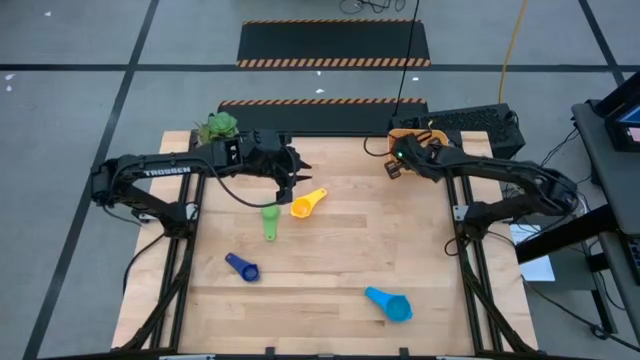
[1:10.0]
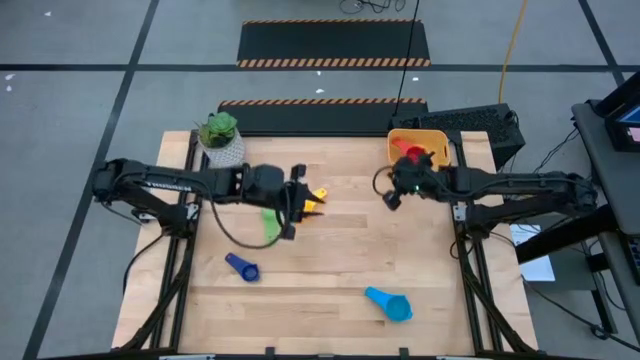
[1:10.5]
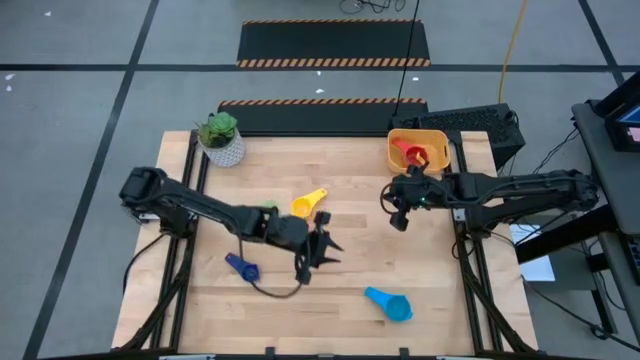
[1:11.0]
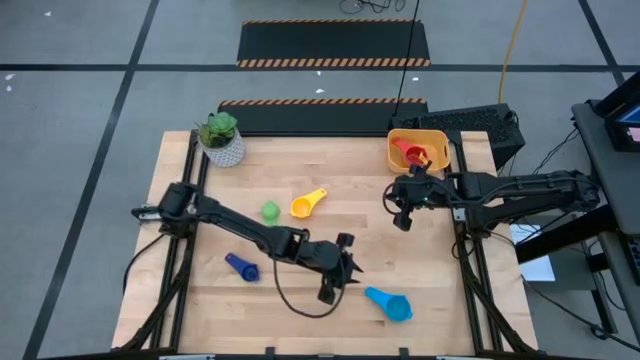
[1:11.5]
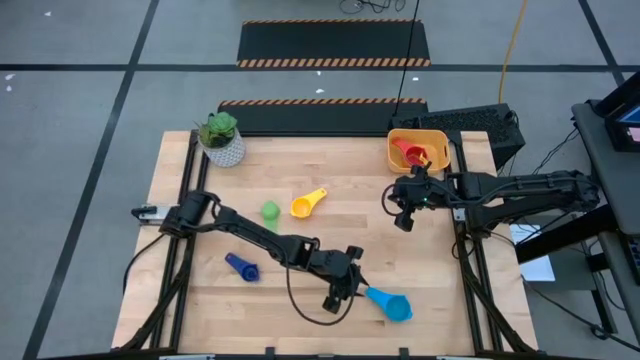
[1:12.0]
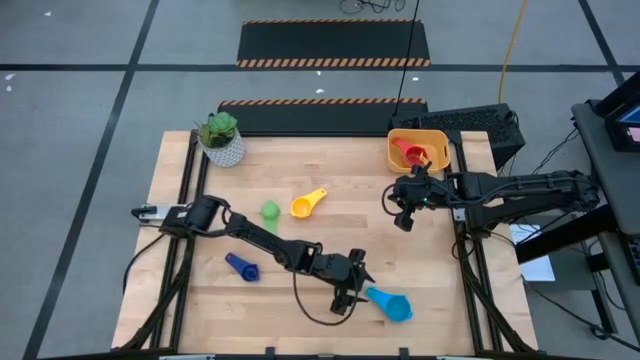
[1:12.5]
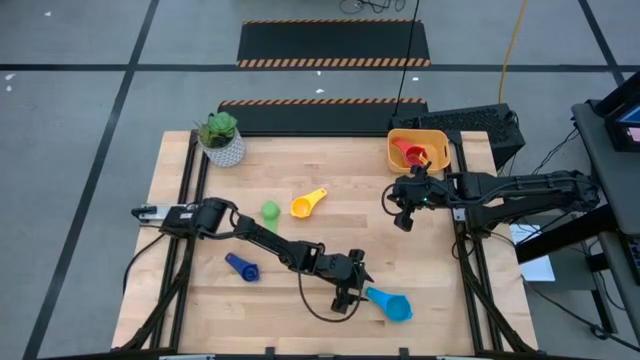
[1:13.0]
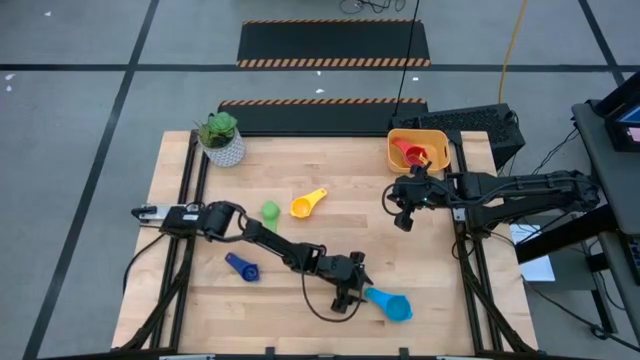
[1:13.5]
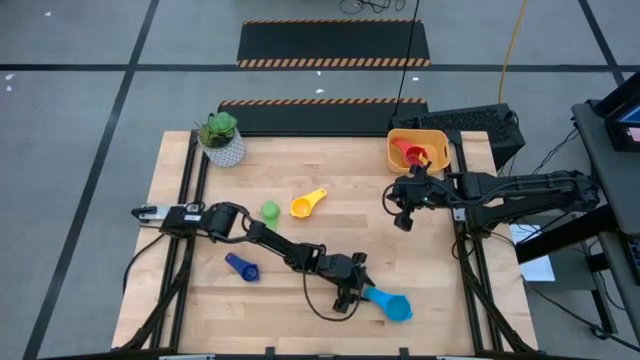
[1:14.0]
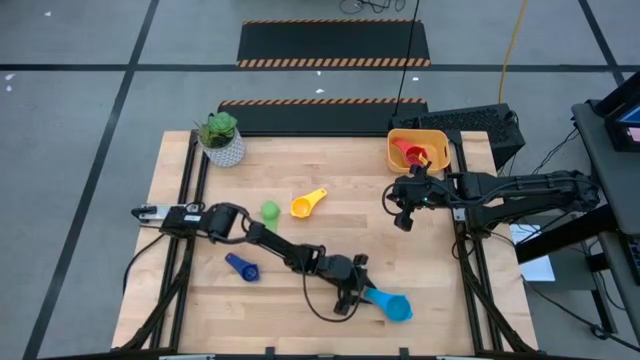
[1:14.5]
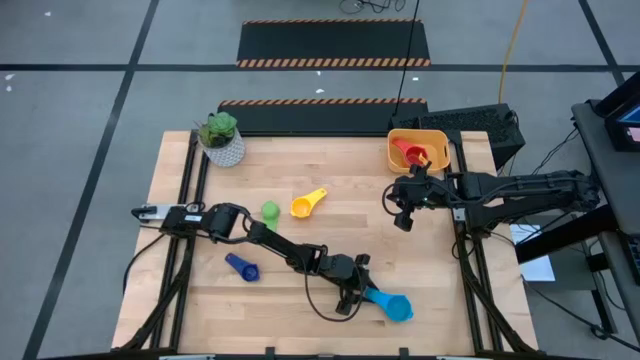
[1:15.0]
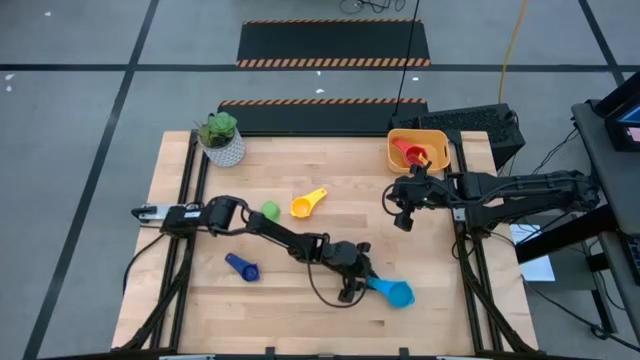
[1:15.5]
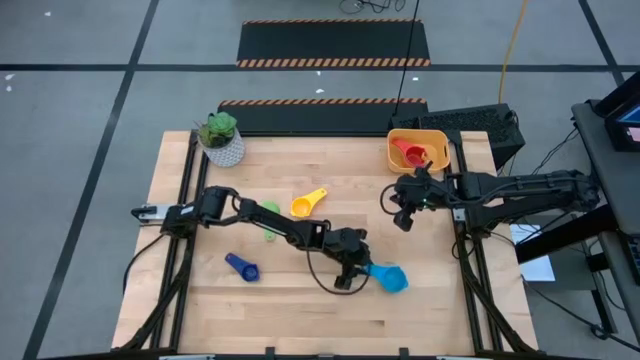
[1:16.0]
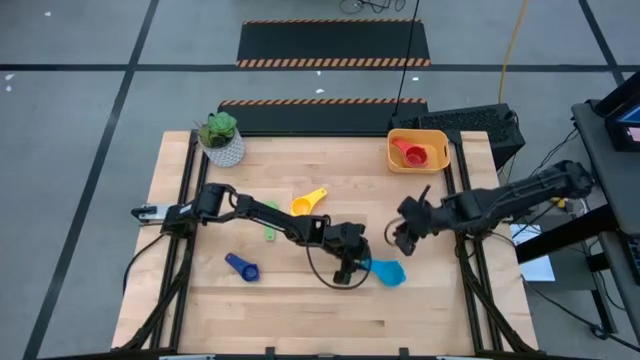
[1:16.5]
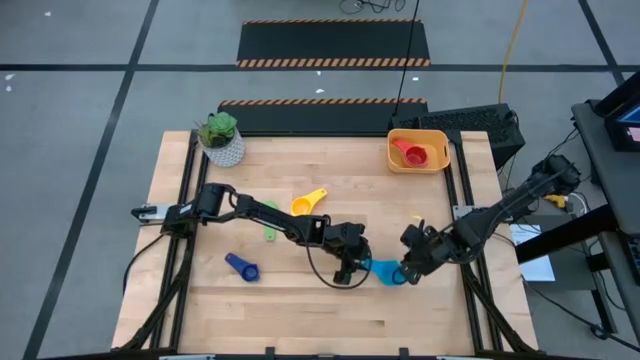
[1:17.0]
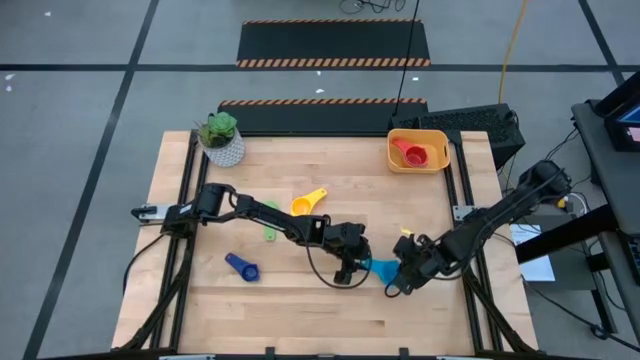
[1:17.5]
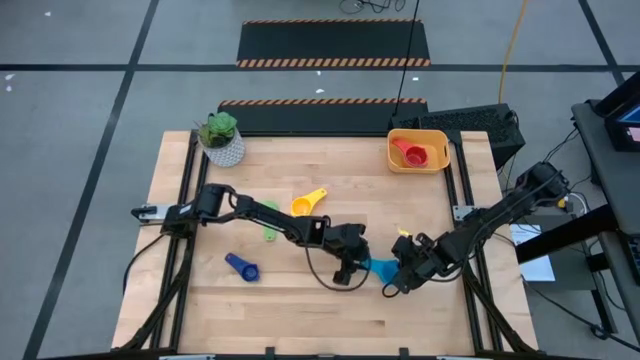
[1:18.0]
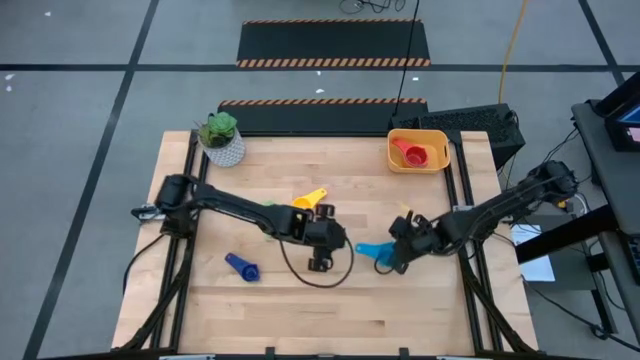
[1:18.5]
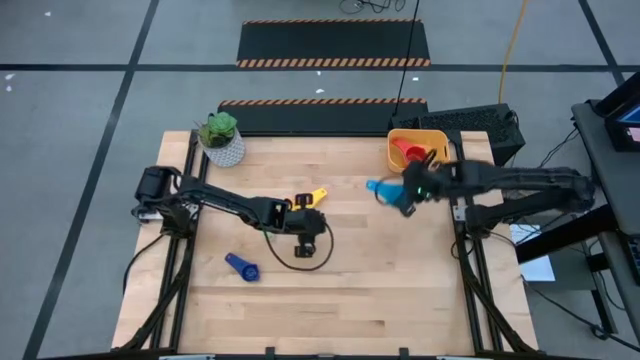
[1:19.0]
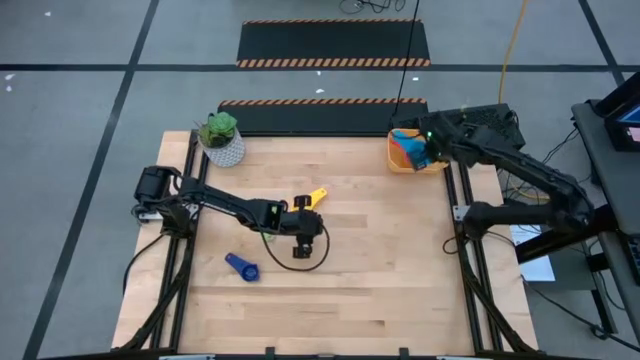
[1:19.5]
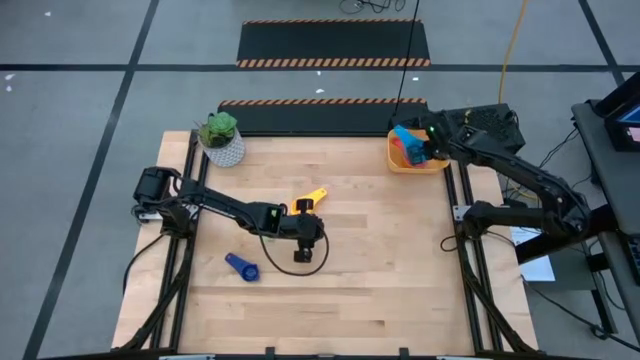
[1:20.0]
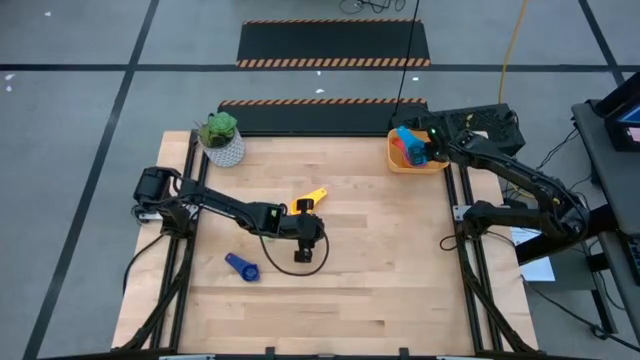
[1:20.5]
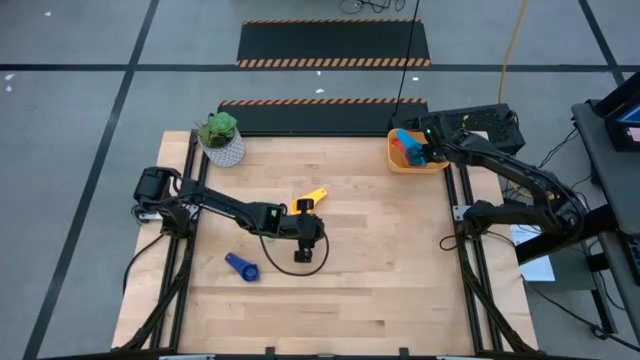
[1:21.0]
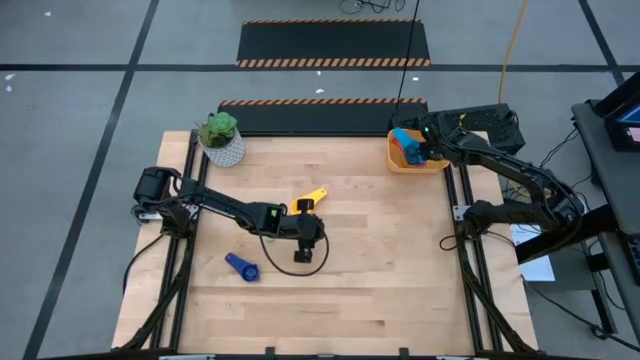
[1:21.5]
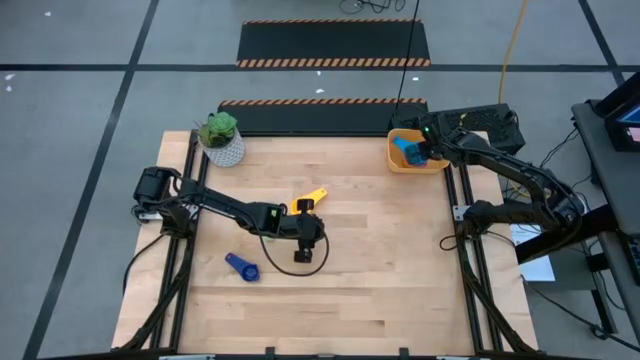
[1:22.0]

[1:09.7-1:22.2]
Task: Nest measuring cups in basket
Stack the light blue measuring cup on top of the red measuring cup into the bin

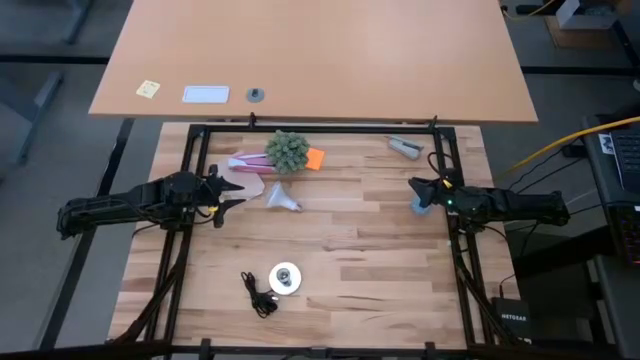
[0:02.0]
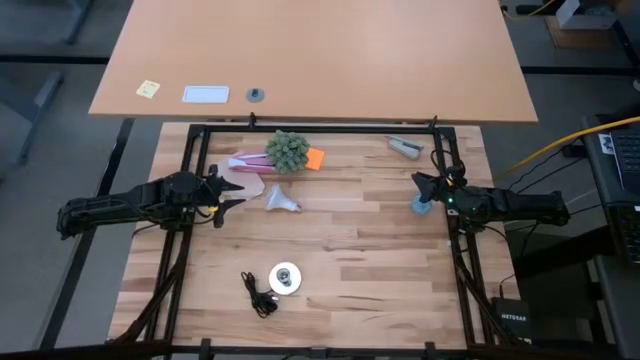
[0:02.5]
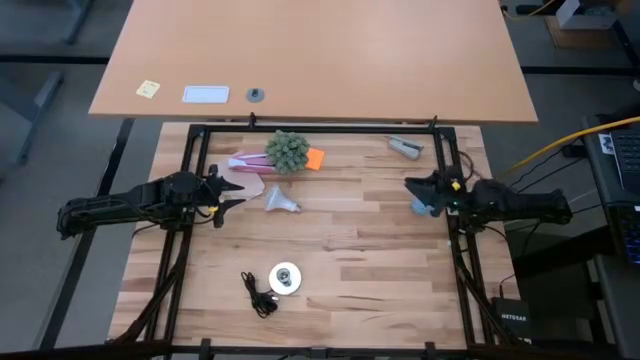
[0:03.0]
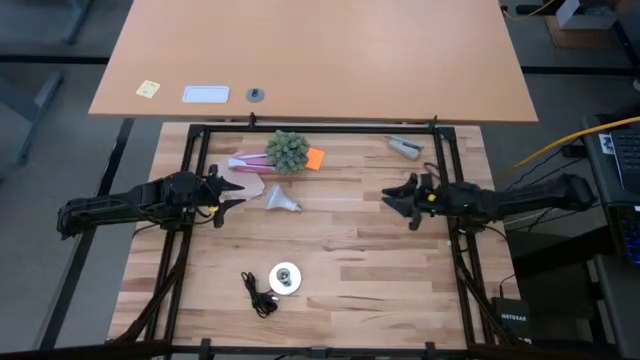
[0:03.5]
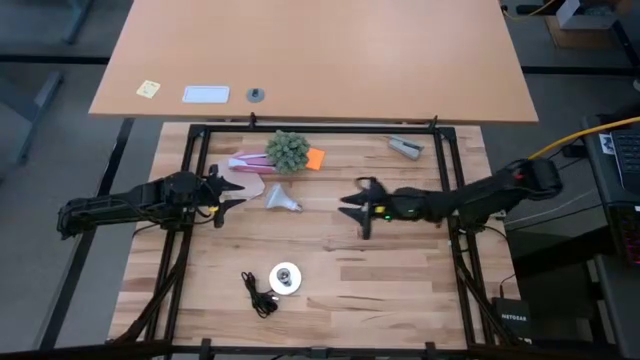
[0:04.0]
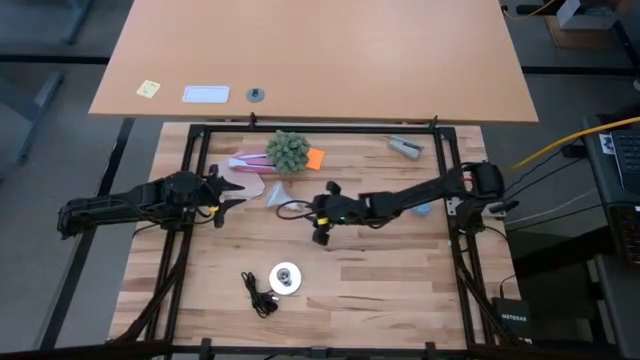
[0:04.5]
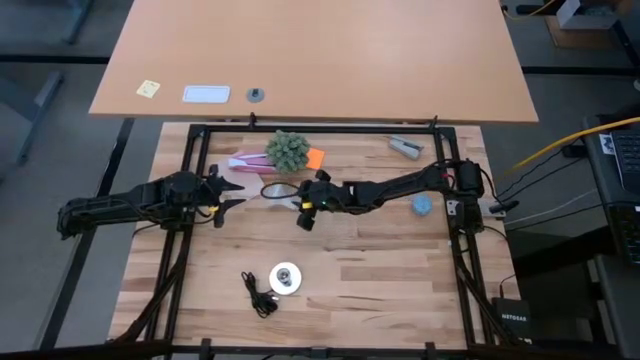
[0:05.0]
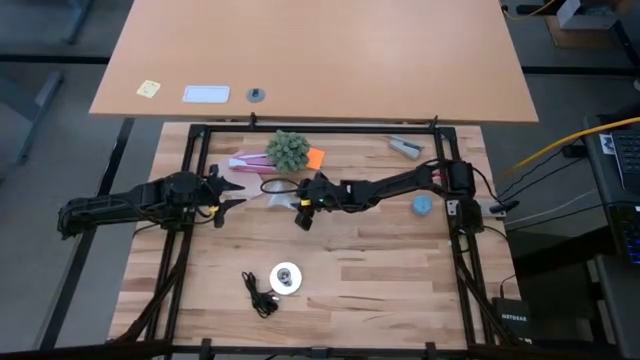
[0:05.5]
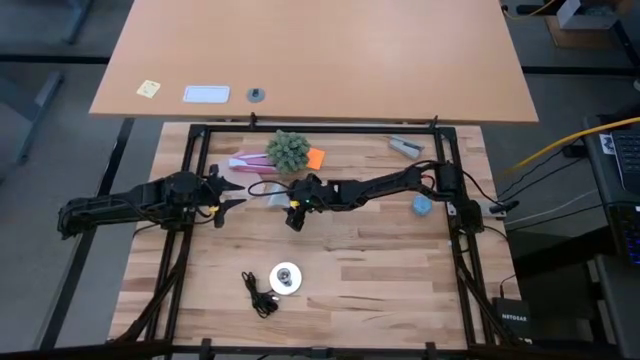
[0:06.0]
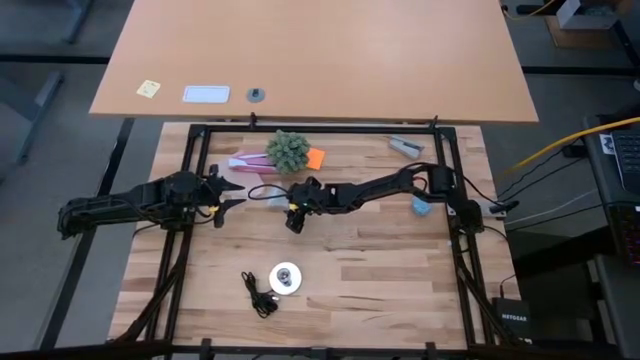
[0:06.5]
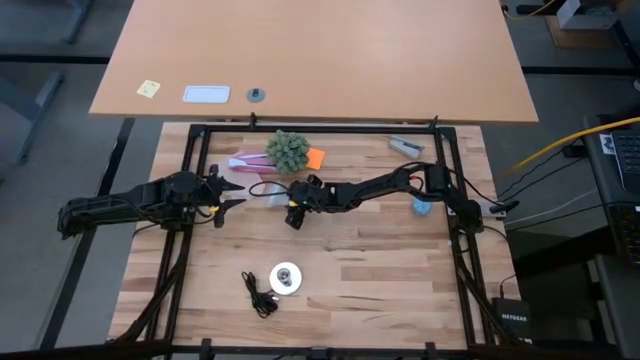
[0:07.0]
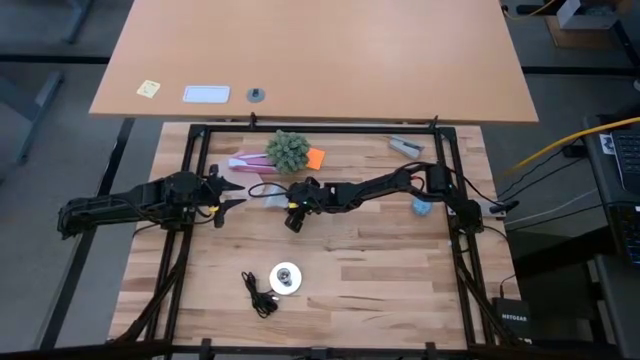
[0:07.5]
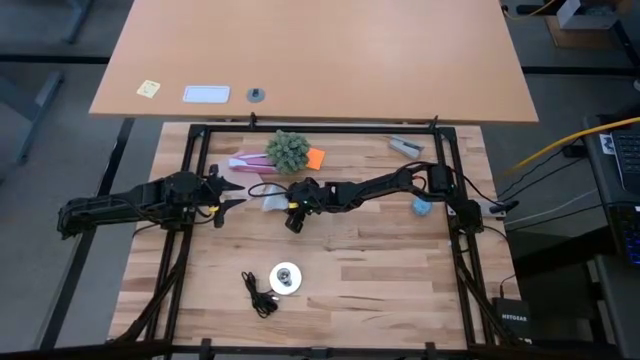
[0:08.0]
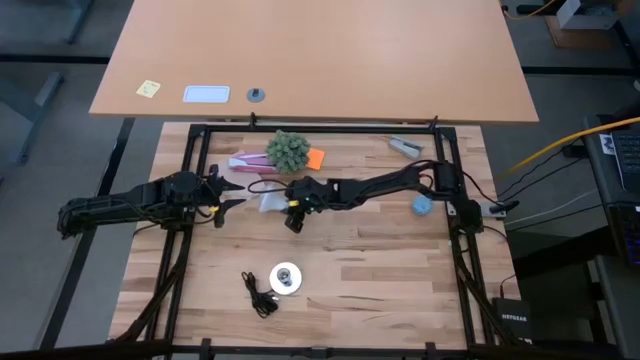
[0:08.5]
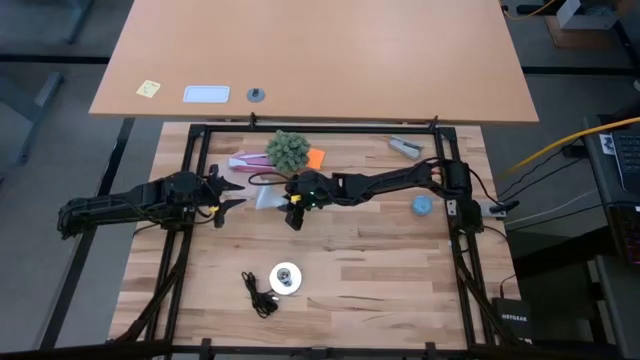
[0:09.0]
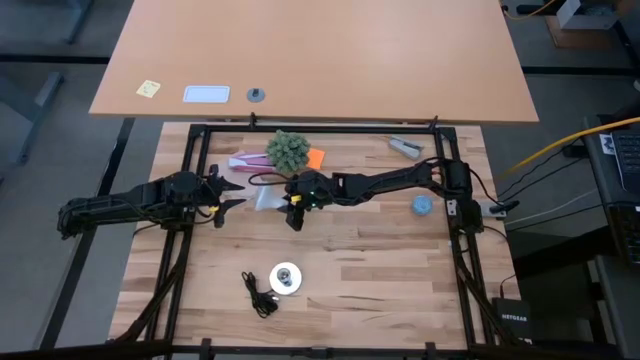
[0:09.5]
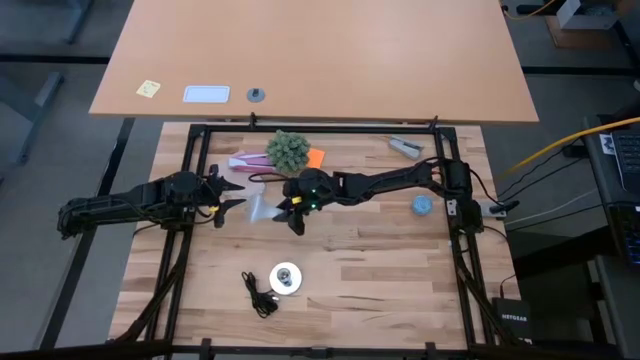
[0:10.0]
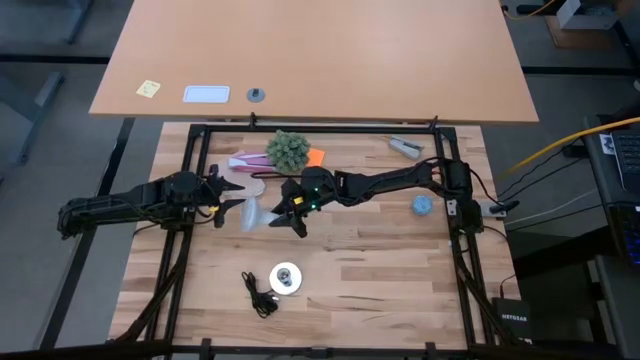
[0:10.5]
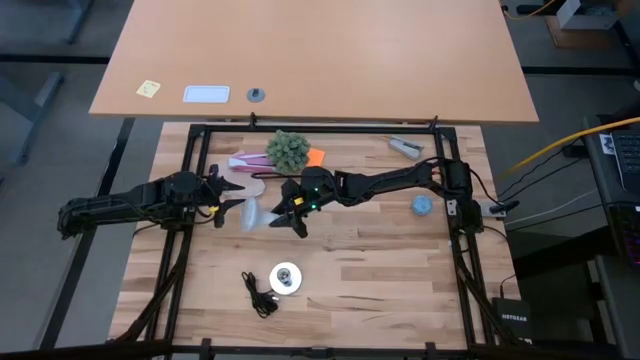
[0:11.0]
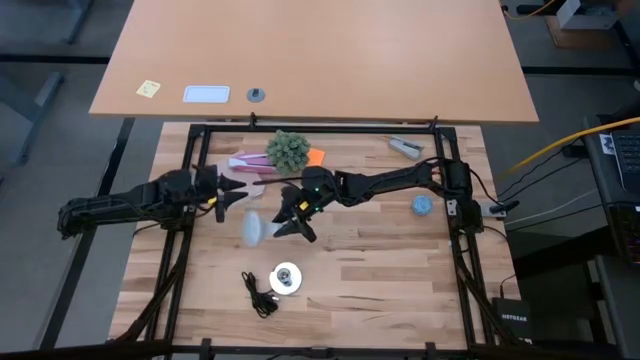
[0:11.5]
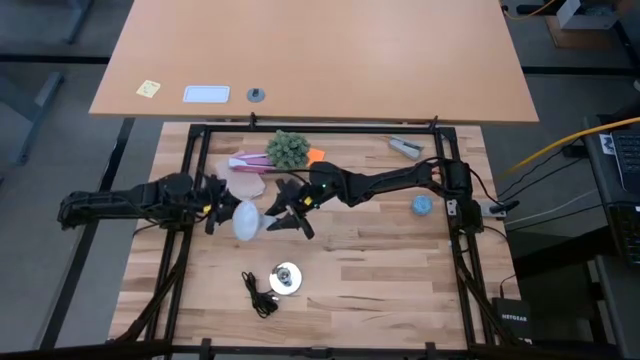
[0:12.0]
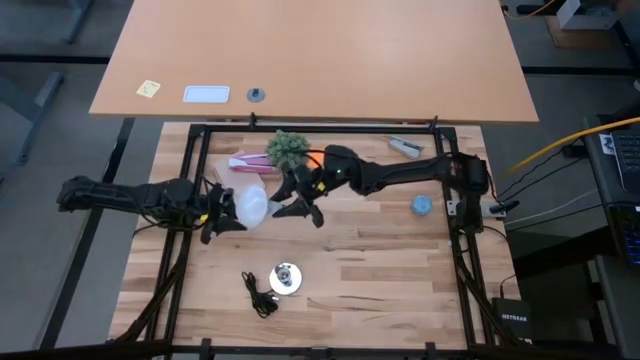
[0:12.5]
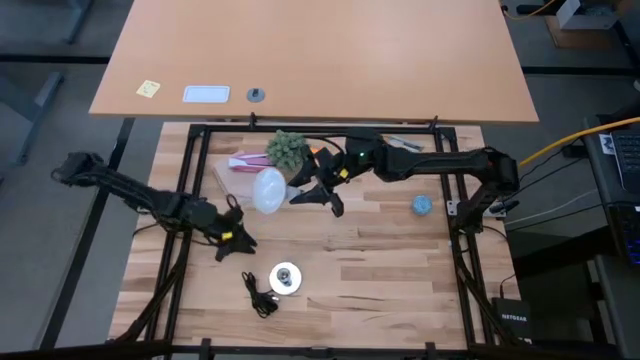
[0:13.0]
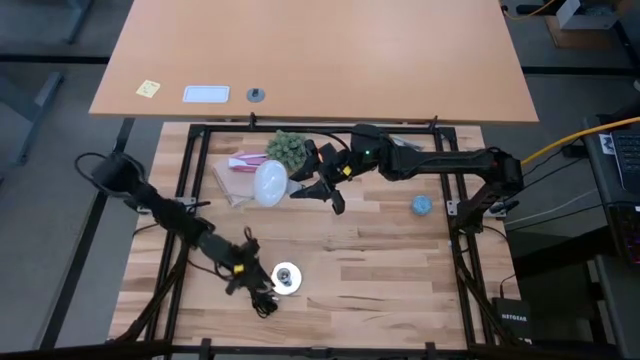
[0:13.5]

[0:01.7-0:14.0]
Task: Screw lightbulb
Insert the lightbulb into the lamp
